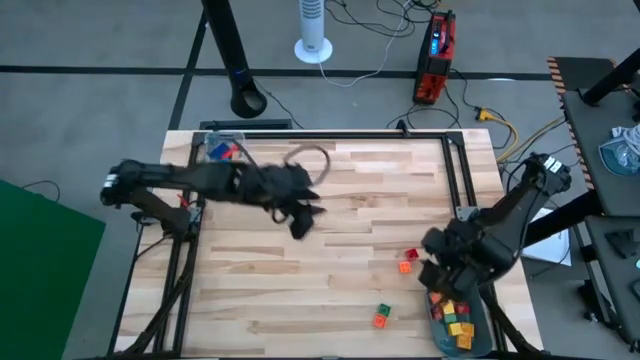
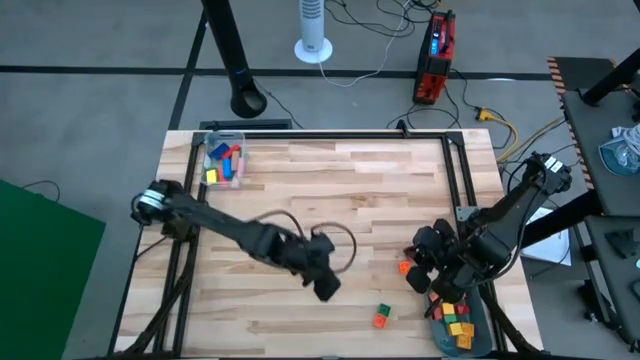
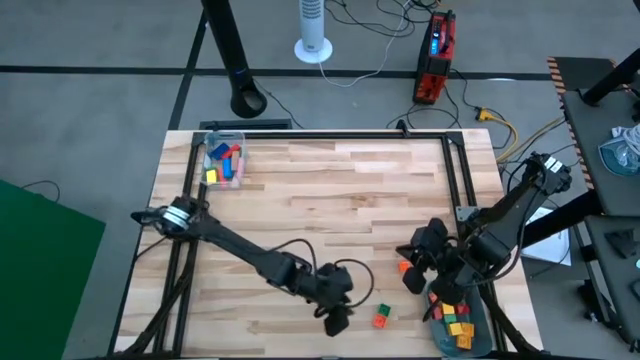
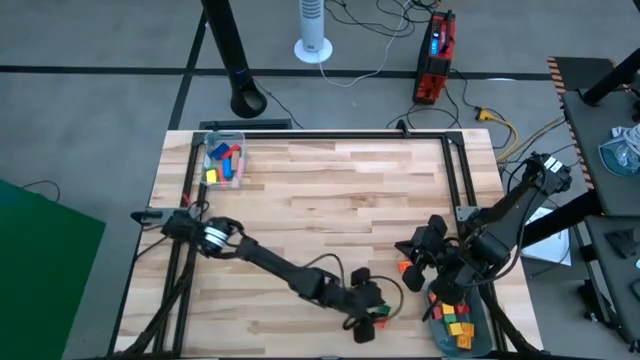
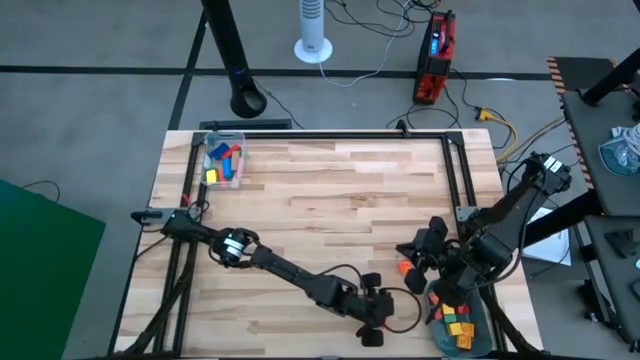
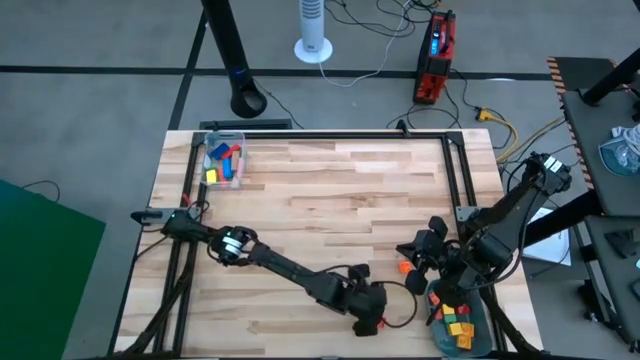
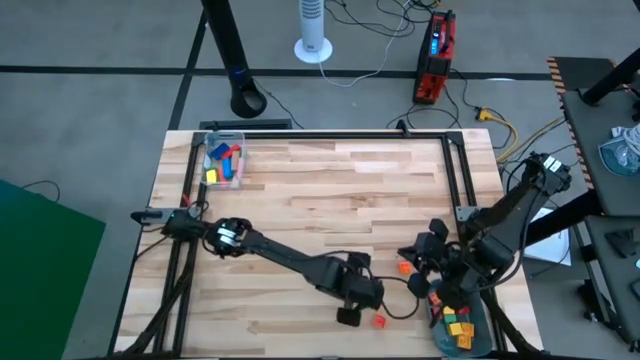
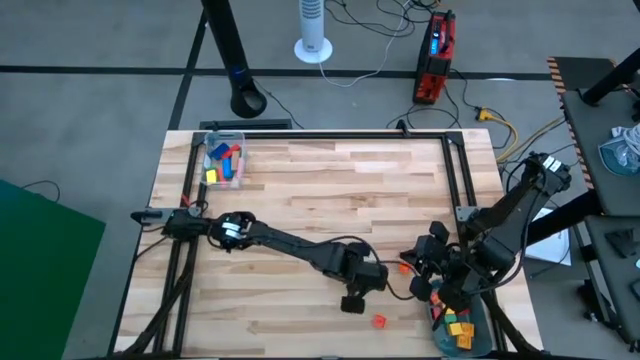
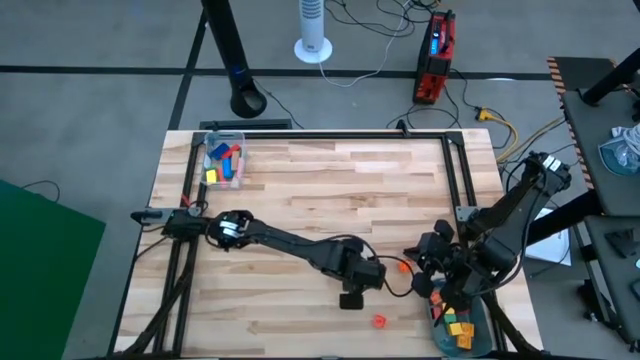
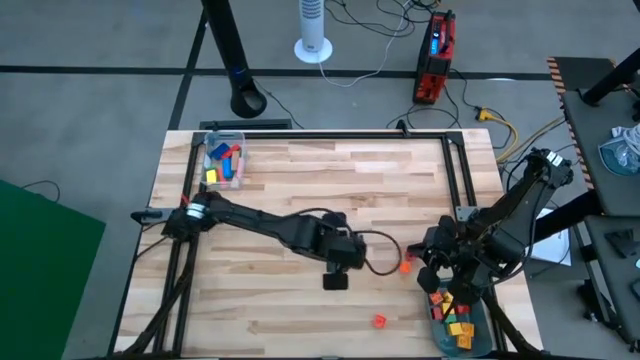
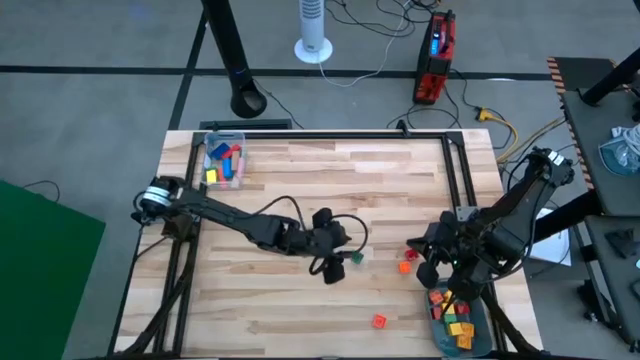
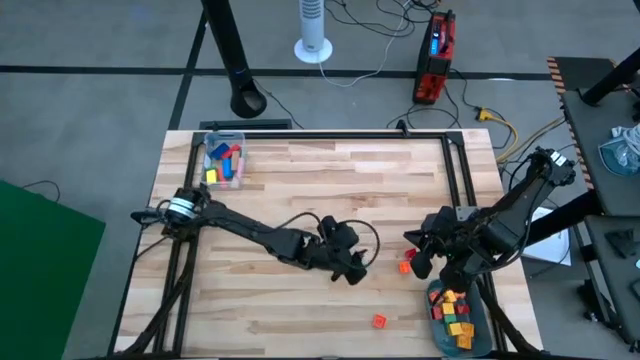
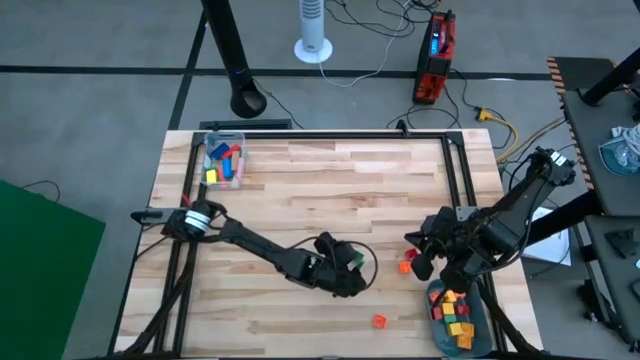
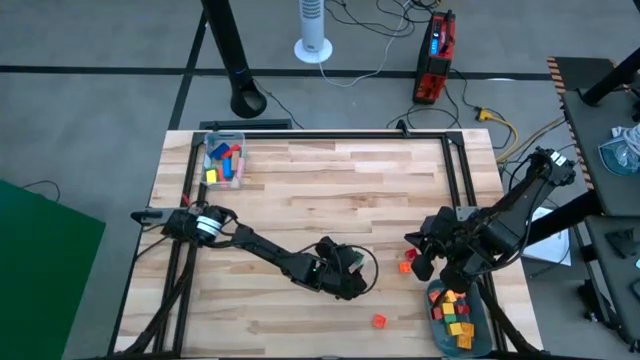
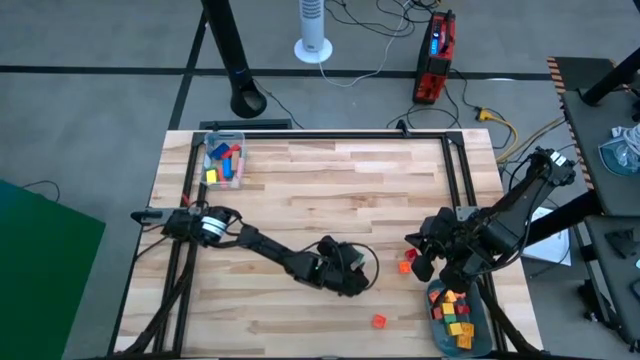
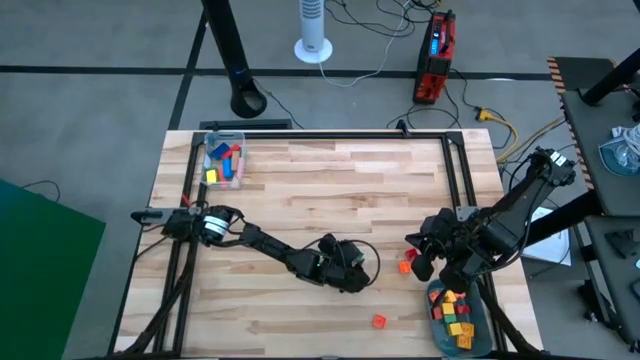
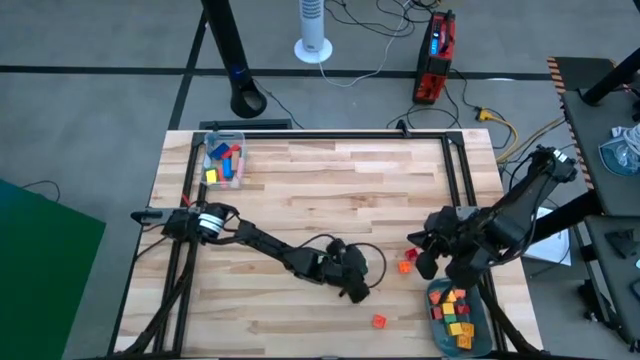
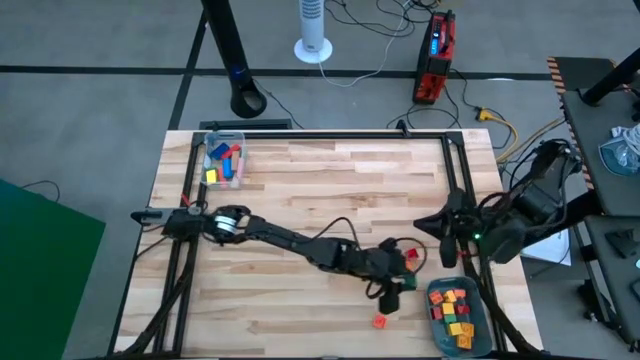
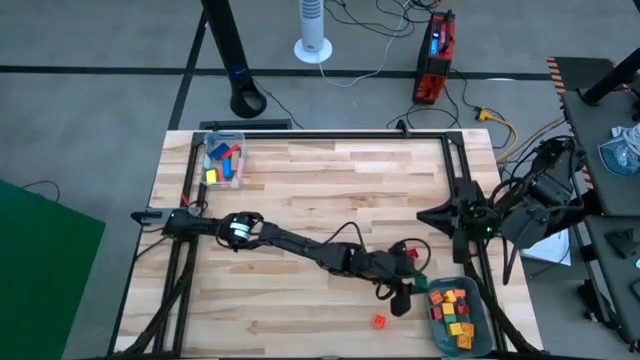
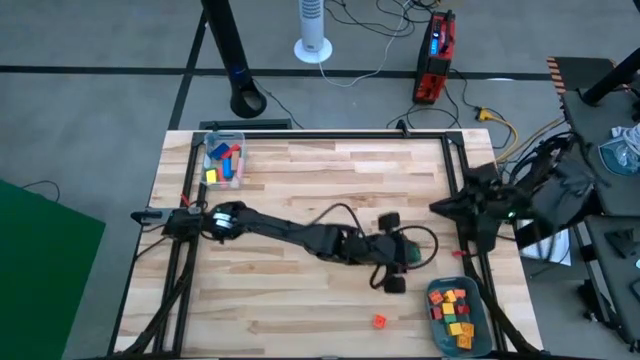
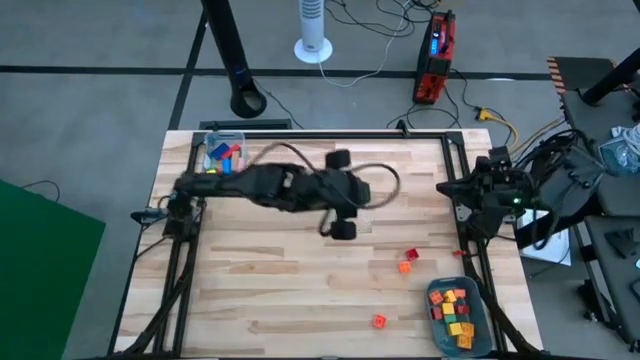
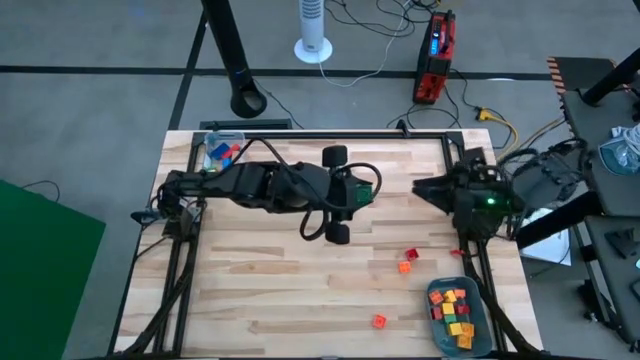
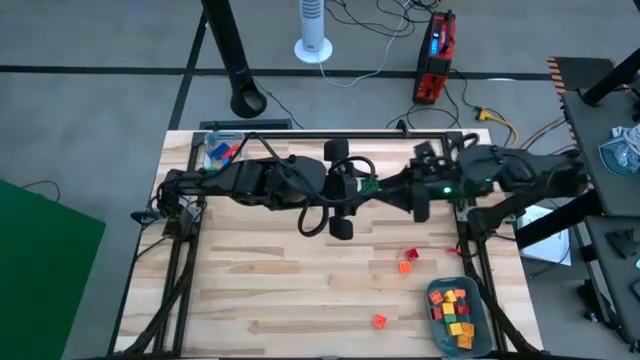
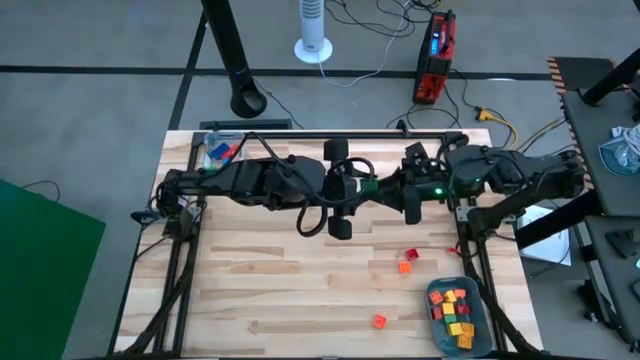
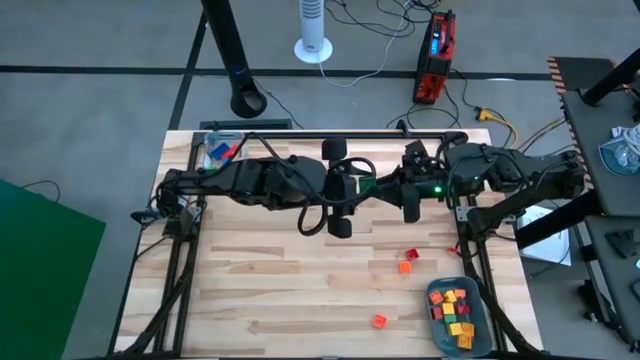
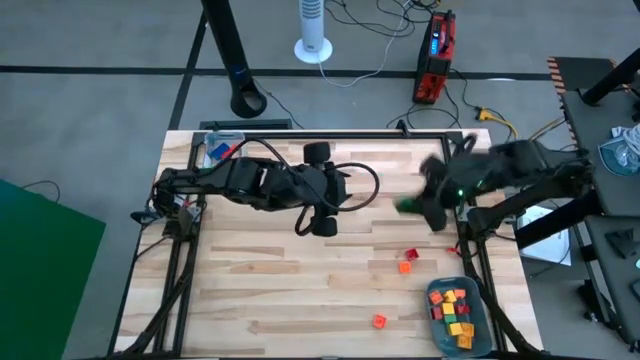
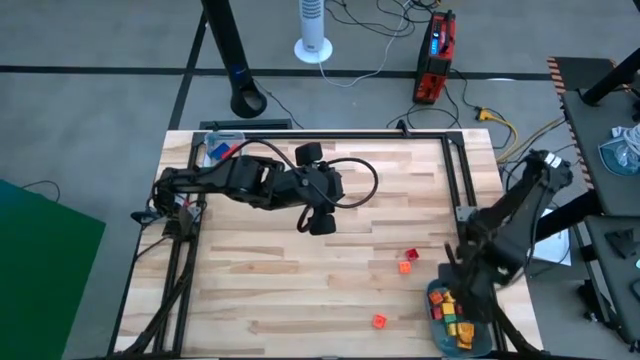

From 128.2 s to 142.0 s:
Task: Sort blocks by size
Put the green square game piece into the blue bin

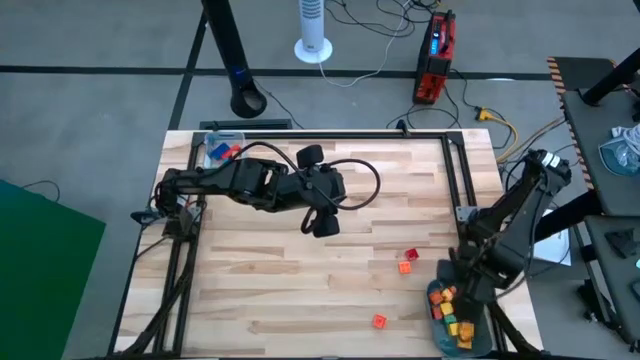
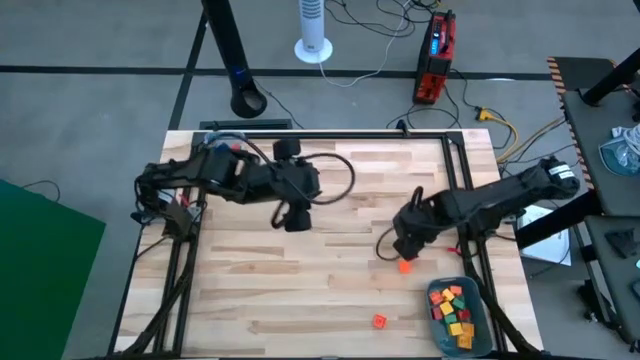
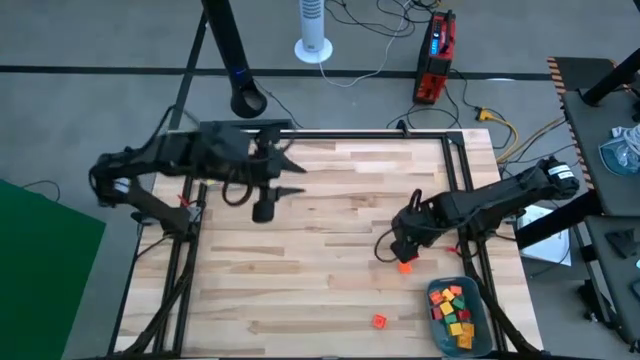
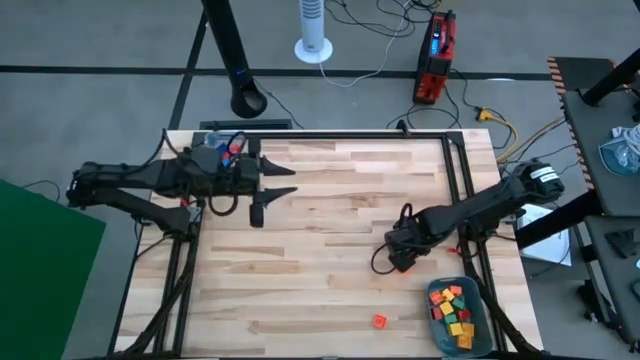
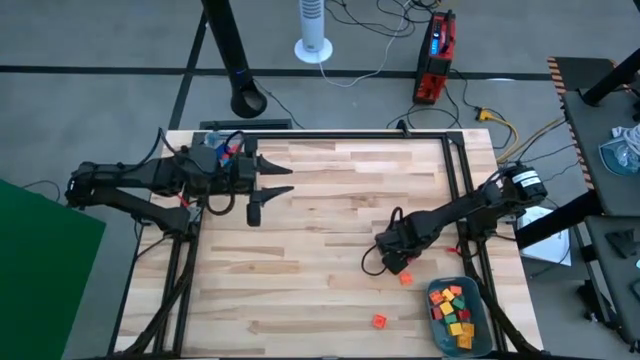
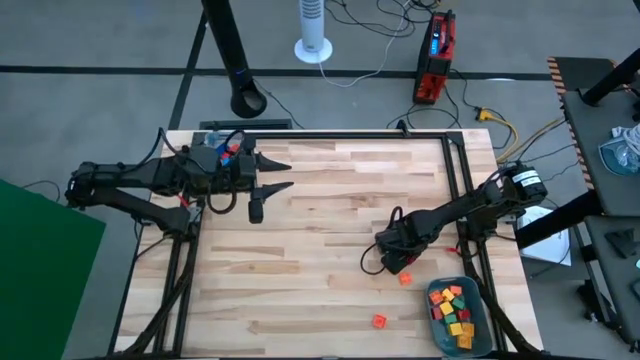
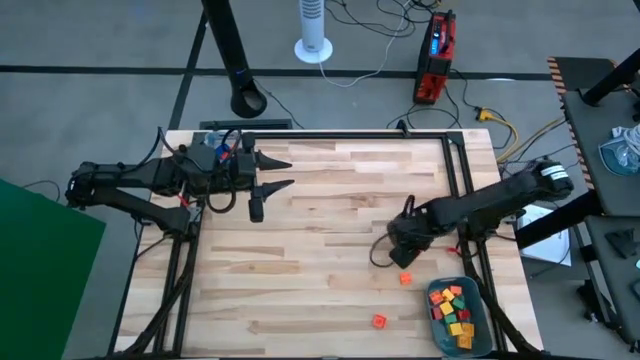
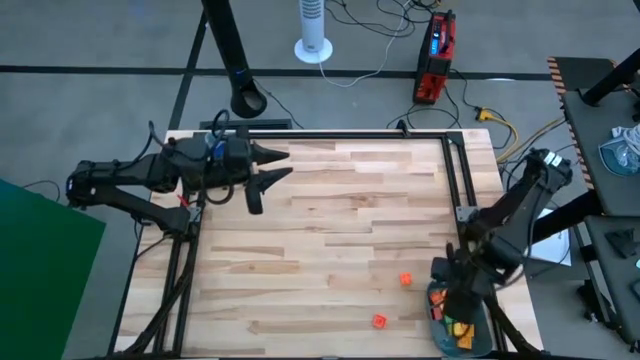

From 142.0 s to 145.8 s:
Put the red square game piece into the blue bin

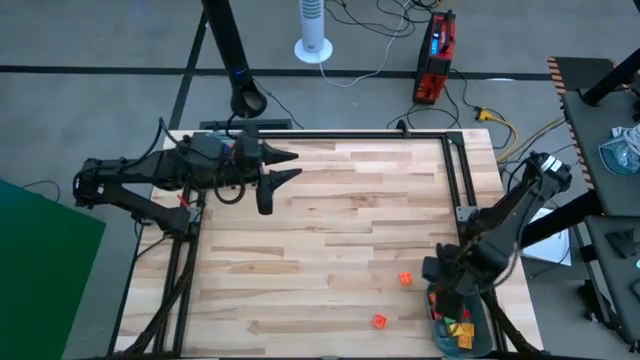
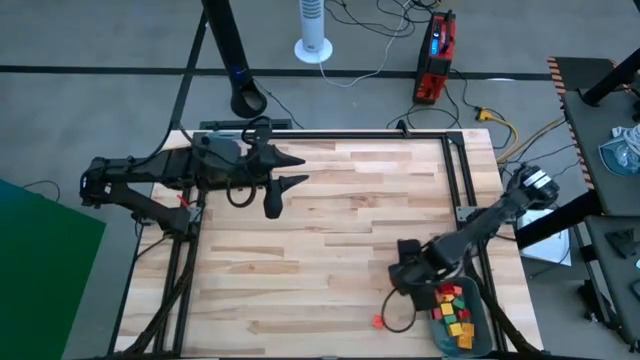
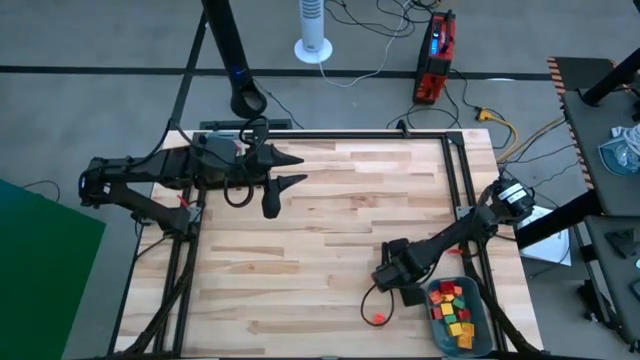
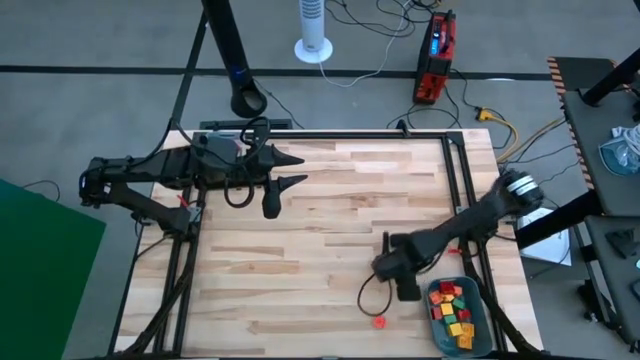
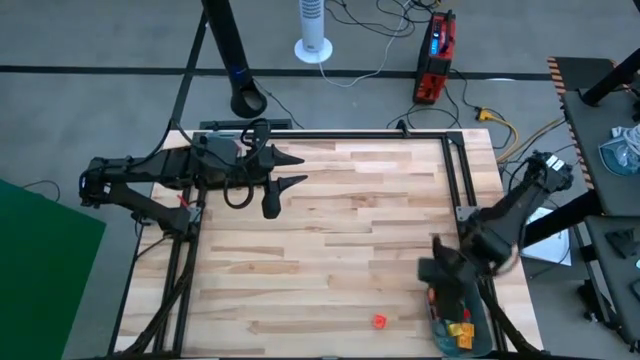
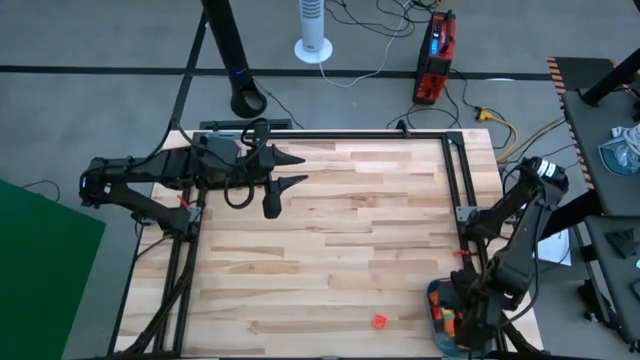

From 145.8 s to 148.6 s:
Put the orange square game piece into the blue bin

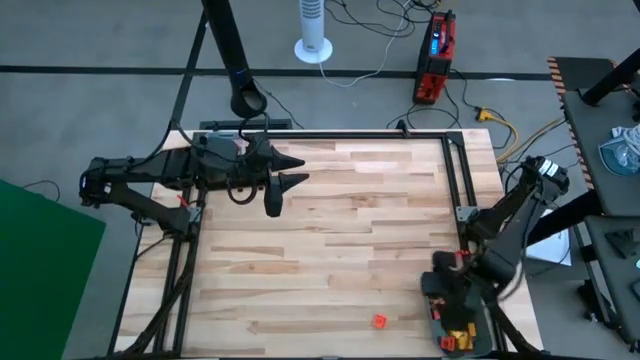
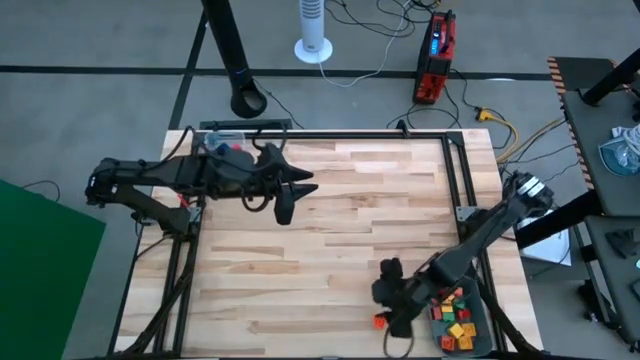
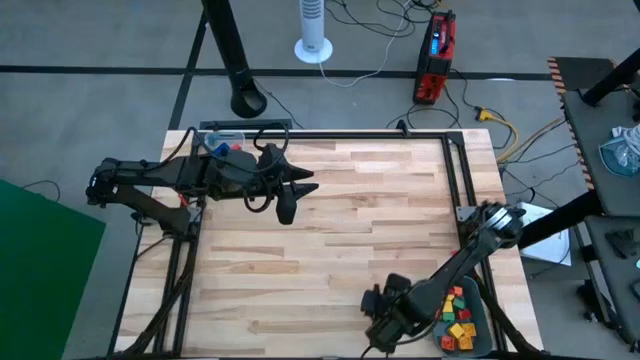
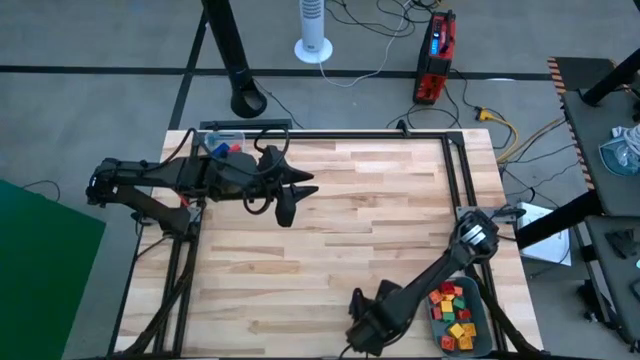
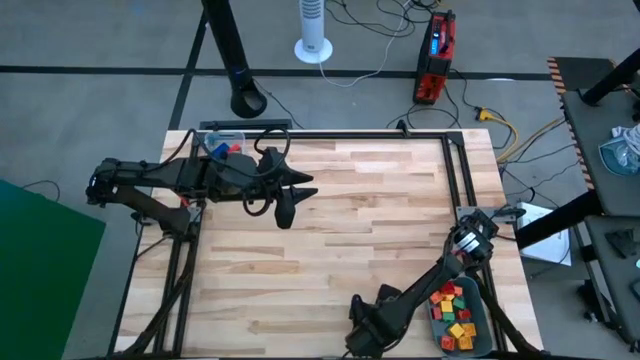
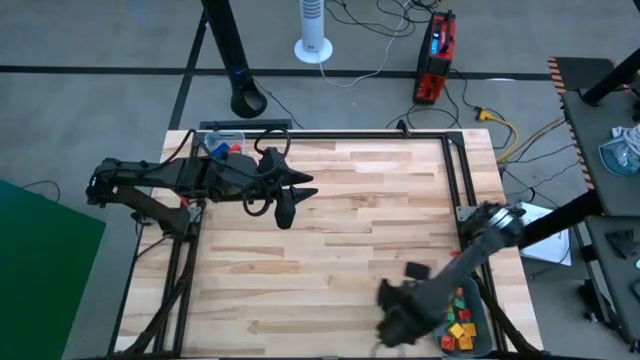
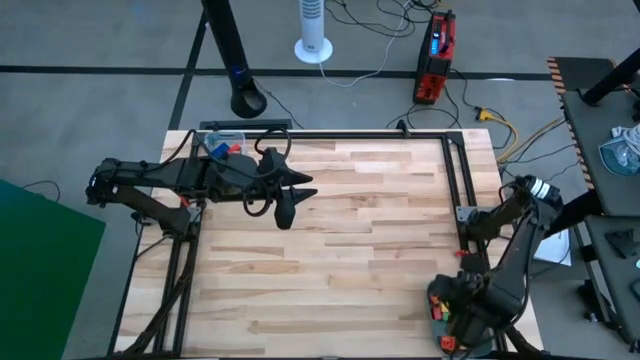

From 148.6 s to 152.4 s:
Put the orange square game piece into the blue bin
